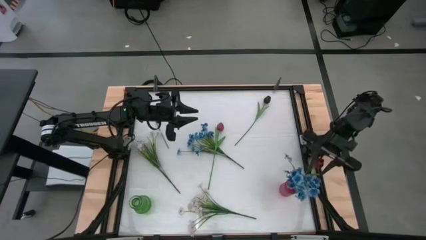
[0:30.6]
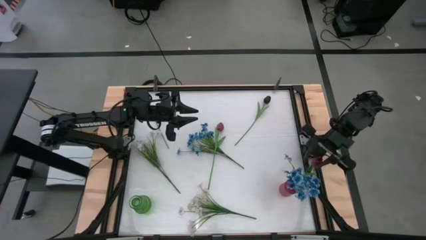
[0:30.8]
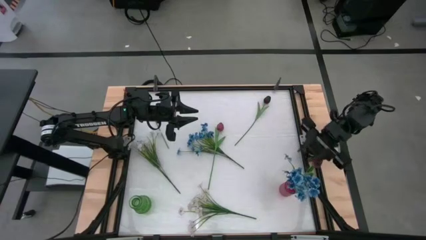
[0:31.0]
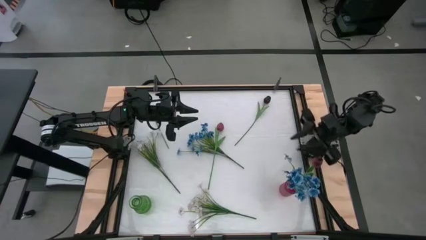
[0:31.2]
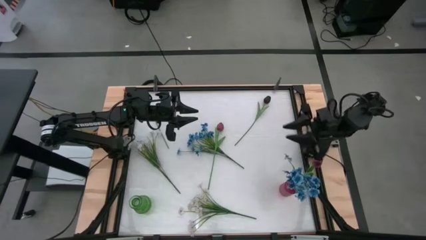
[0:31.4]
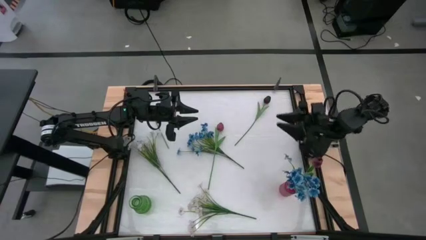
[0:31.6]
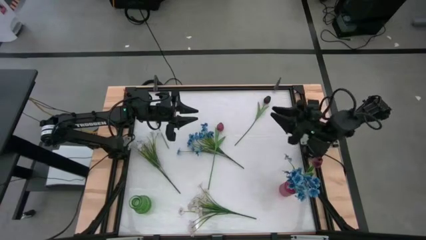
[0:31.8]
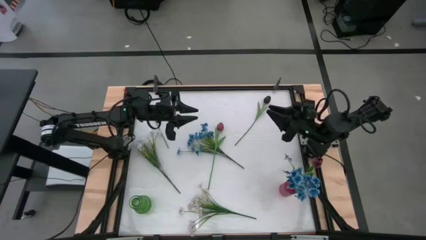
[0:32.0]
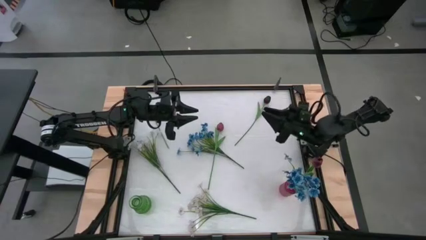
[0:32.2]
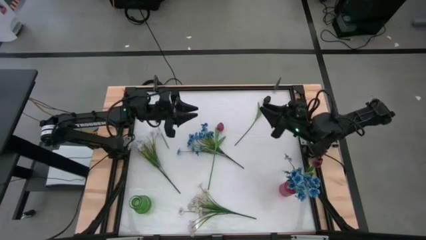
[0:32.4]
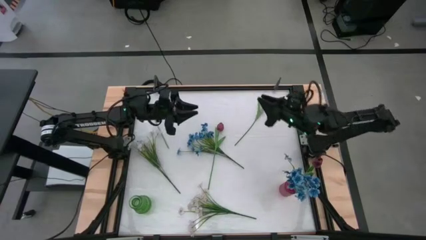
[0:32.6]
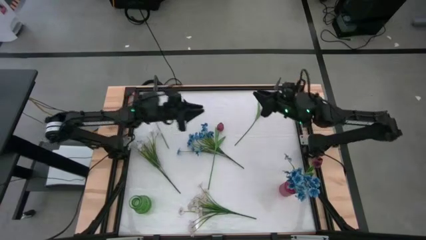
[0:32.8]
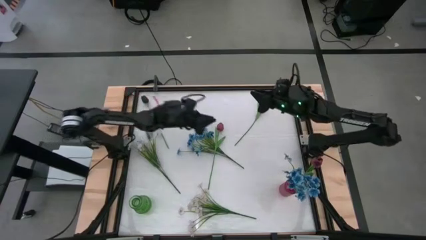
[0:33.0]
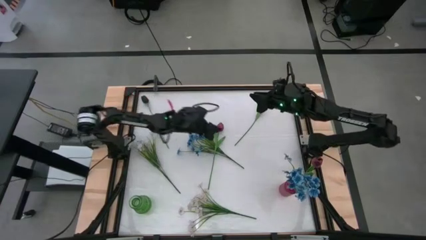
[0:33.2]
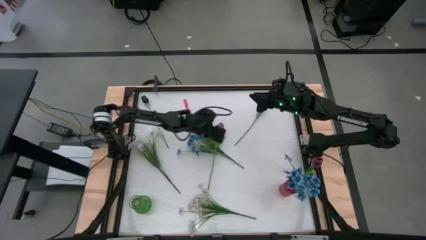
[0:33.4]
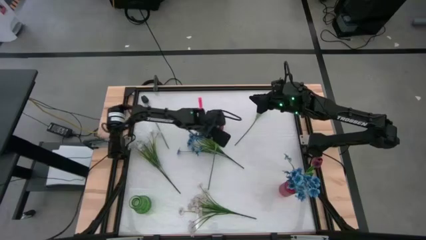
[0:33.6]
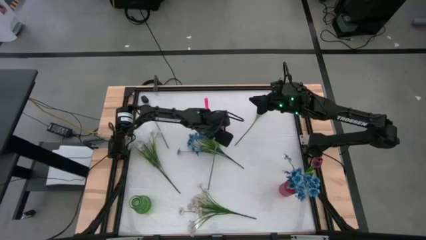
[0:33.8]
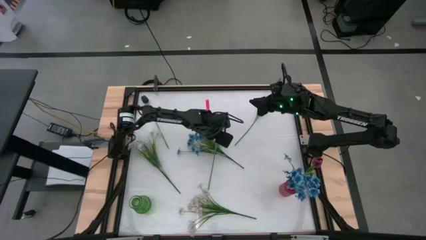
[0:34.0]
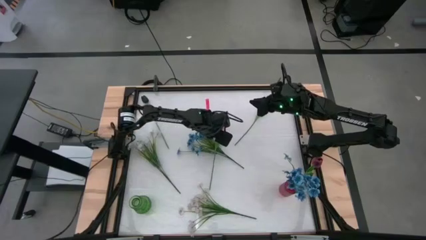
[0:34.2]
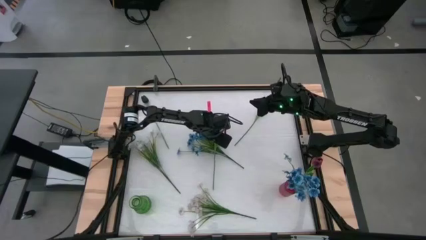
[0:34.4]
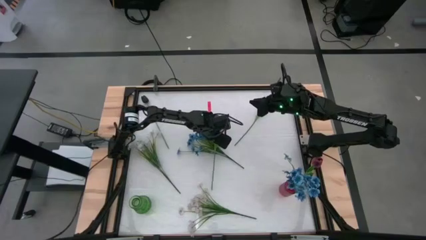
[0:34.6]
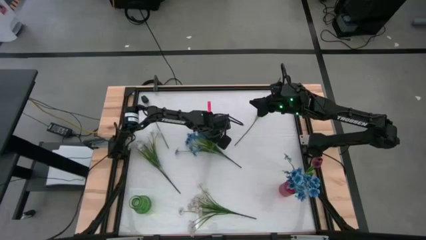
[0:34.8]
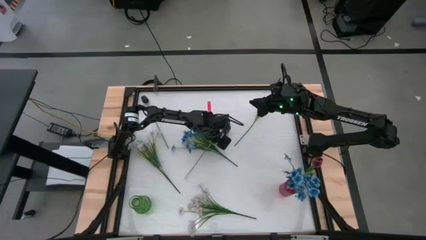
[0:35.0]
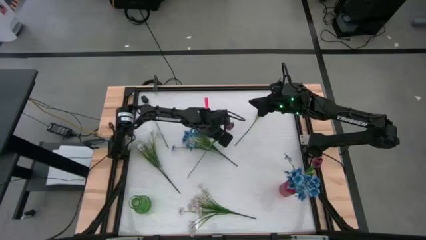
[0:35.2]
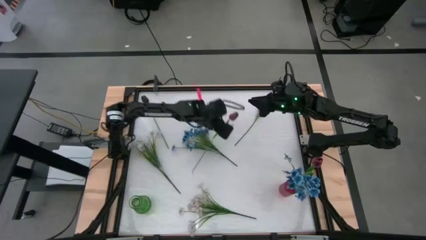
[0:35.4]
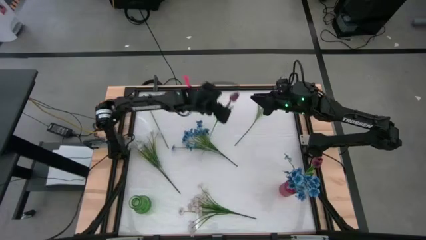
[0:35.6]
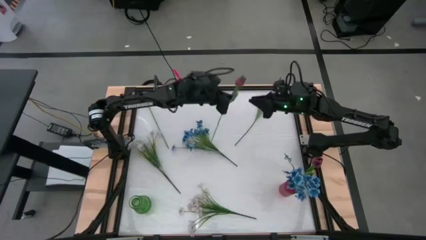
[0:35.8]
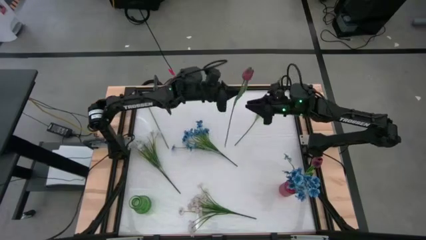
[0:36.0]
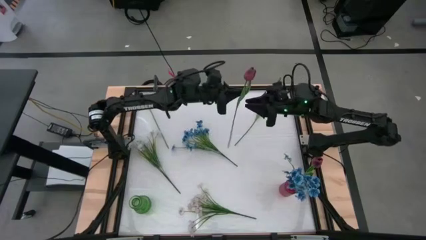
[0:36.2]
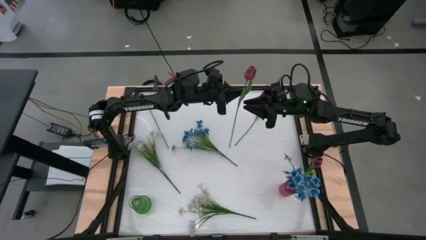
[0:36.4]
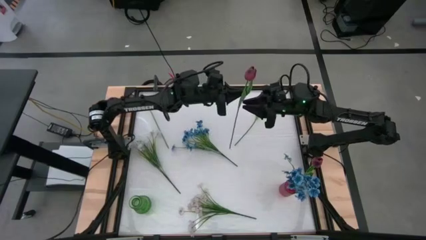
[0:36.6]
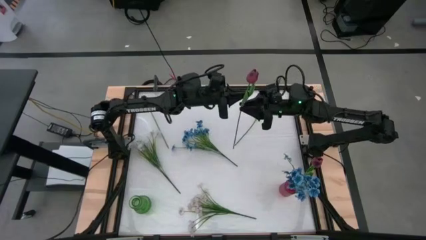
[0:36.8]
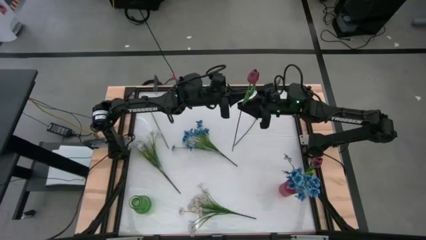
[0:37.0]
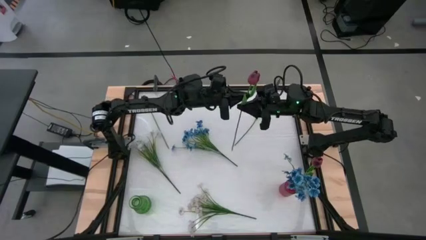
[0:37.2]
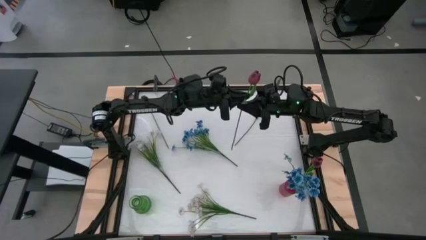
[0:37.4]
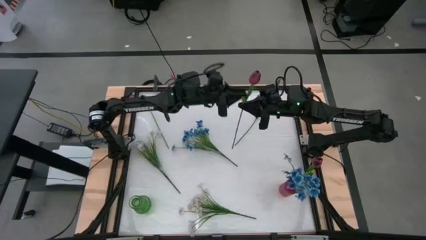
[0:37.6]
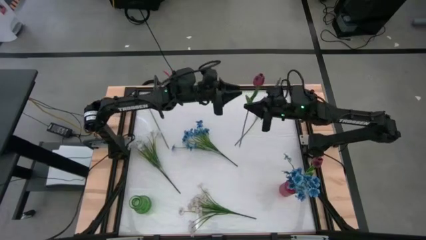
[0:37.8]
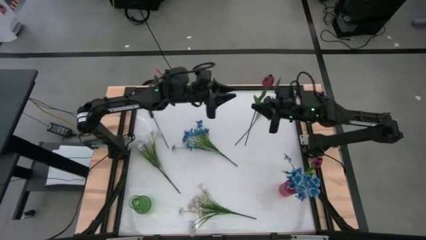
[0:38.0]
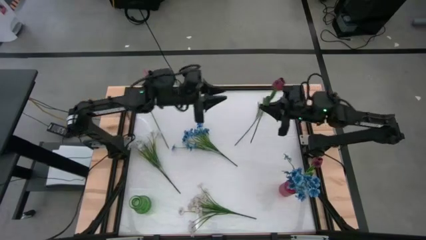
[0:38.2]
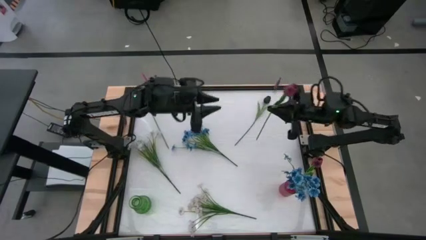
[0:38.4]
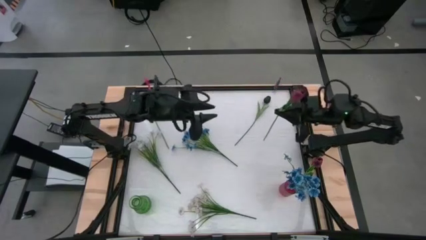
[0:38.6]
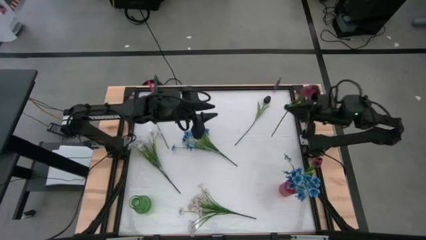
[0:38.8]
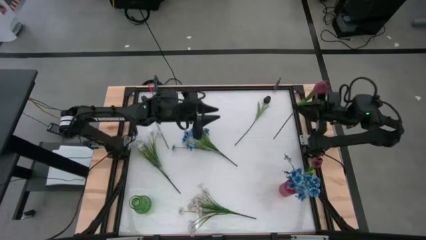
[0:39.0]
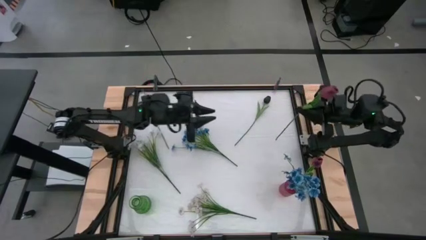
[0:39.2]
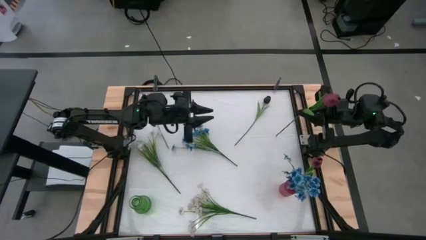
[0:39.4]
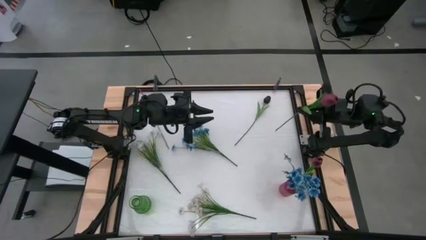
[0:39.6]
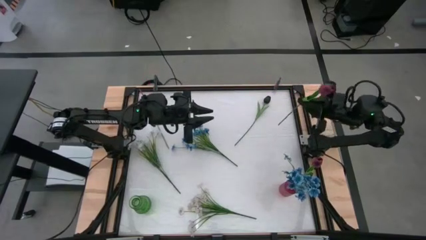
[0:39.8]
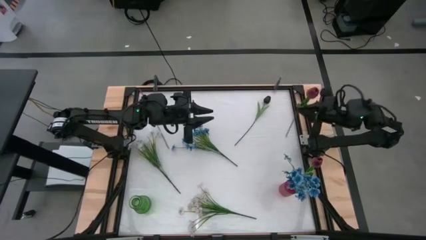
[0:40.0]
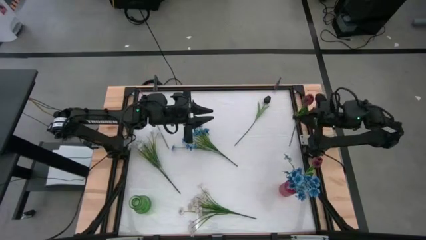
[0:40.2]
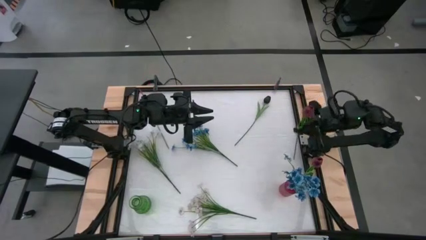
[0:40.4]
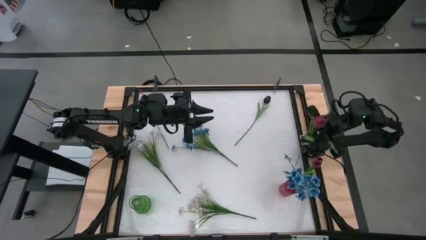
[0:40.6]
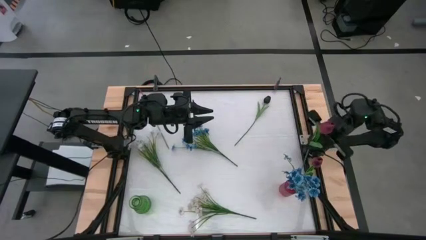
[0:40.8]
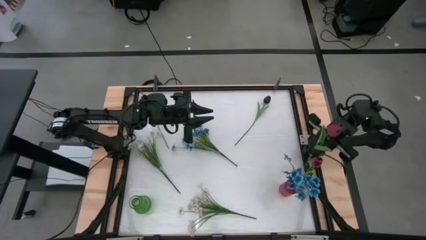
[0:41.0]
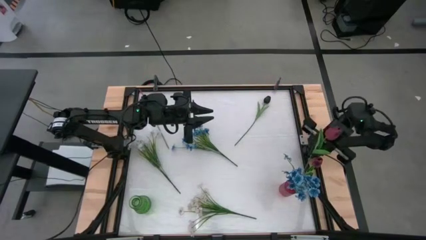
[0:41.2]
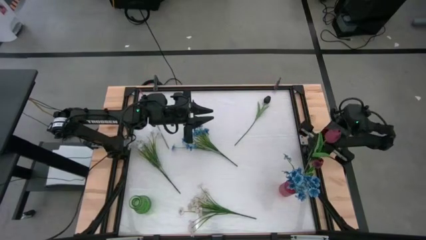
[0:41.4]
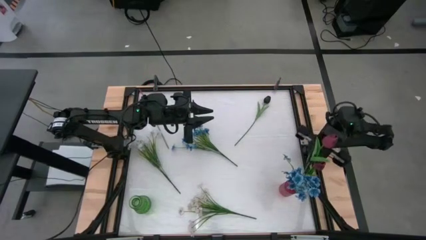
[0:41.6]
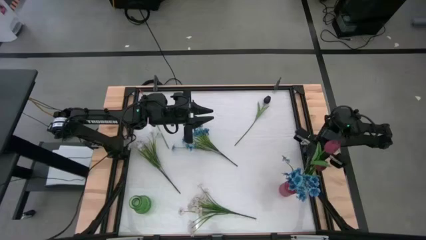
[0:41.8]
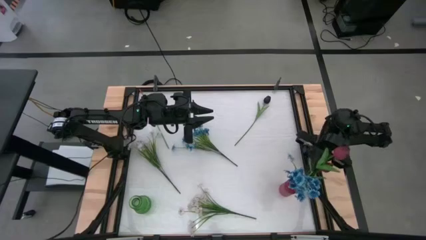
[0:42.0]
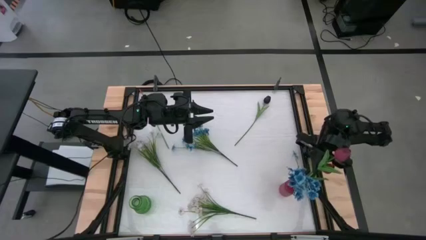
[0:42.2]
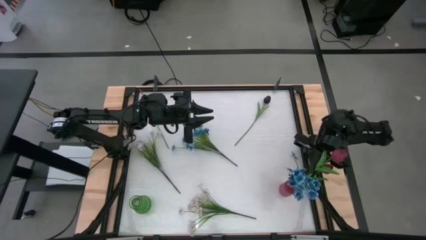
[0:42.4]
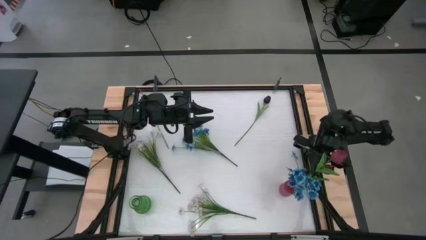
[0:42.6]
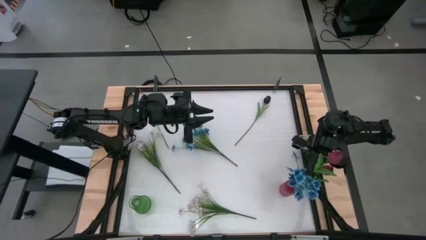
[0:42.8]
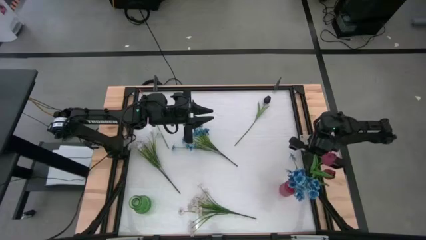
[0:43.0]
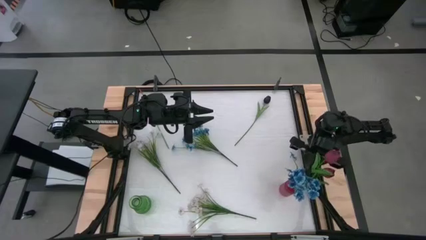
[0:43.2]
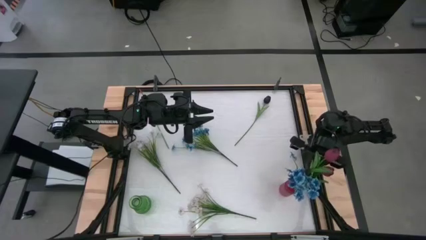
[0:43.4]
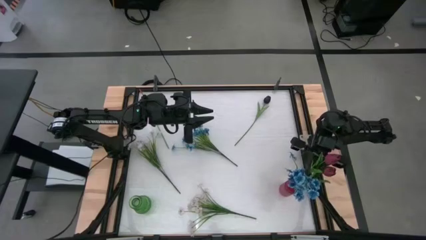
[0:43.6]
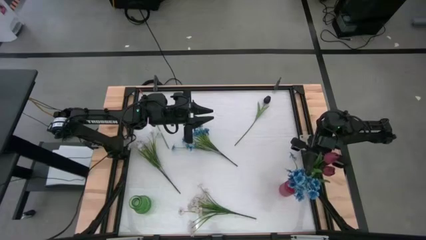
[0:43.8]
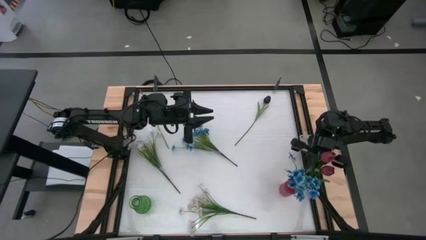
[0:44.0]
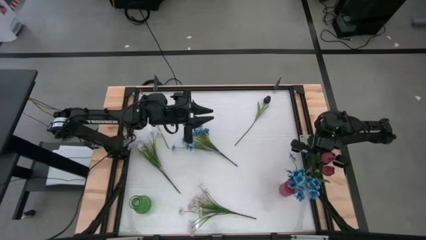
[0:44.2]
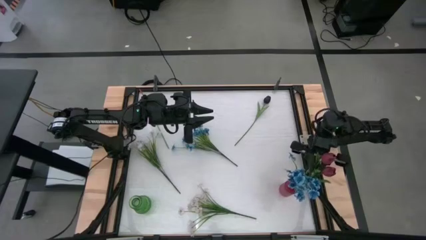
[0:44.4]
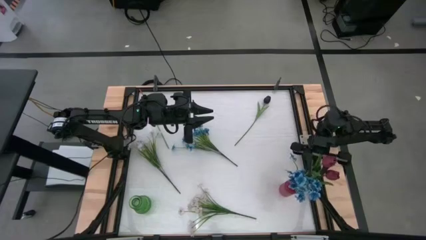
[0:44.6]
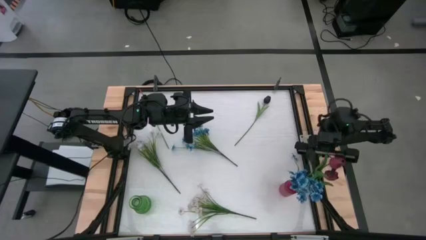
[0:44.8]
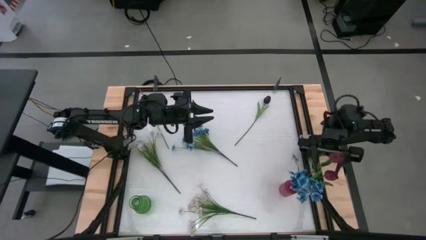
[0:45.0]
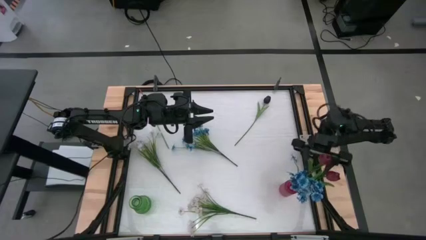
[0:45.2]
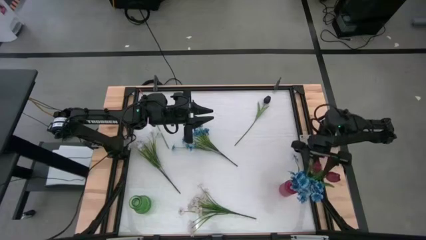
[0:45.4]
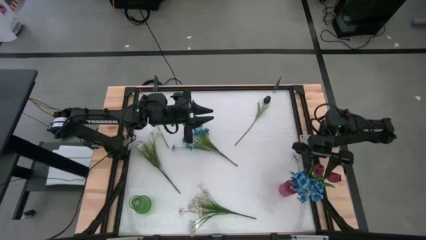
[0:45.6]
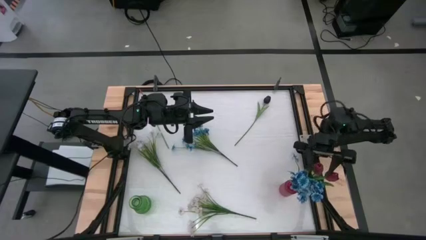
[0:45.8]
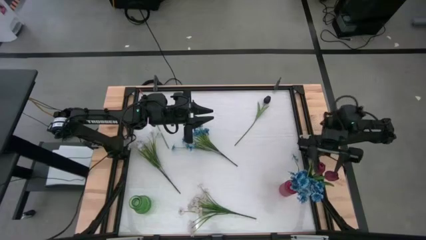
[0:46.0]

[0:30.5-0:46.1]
Task: Sort flowers into vase by color
Put the red tulip flower into the red flower vase

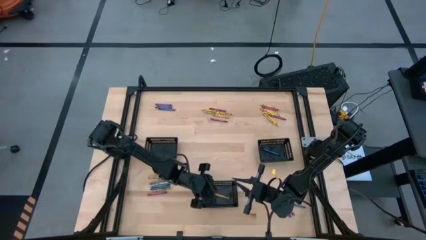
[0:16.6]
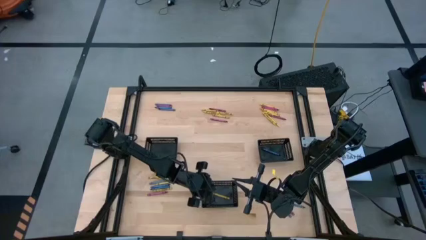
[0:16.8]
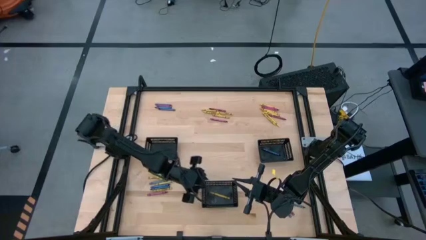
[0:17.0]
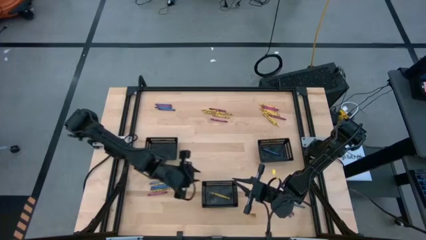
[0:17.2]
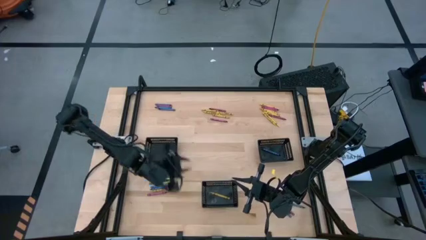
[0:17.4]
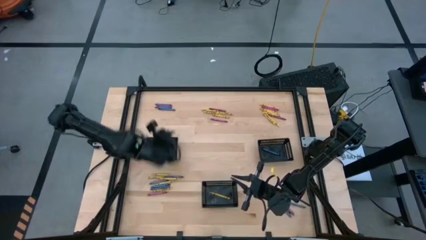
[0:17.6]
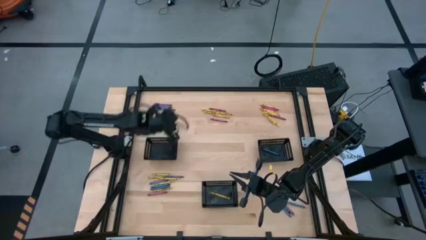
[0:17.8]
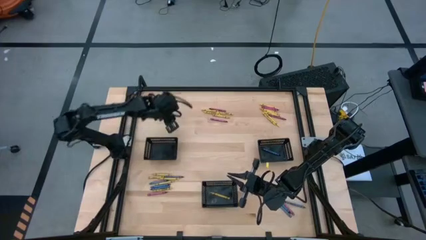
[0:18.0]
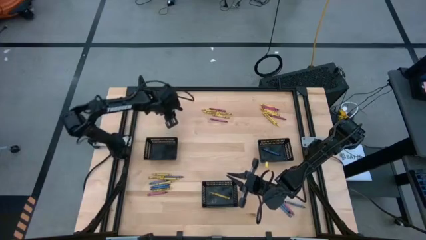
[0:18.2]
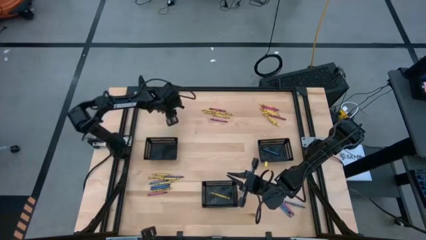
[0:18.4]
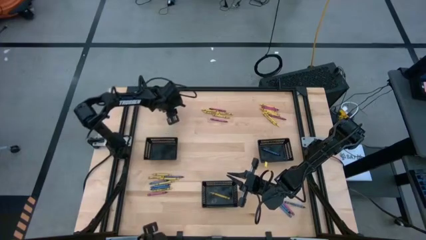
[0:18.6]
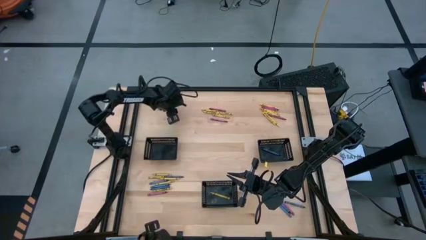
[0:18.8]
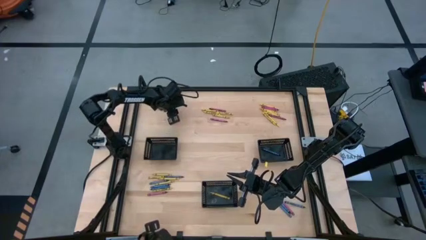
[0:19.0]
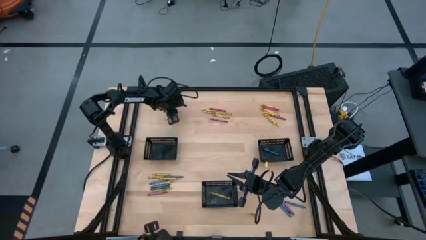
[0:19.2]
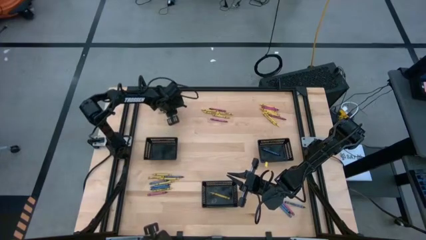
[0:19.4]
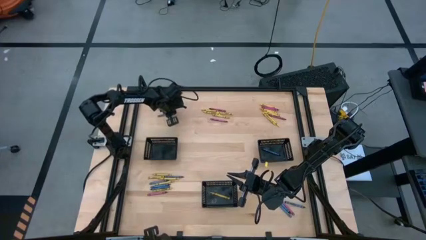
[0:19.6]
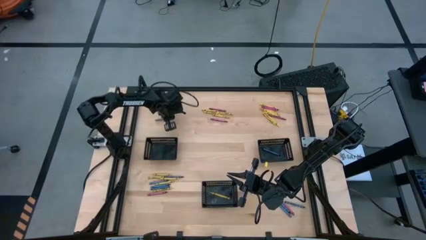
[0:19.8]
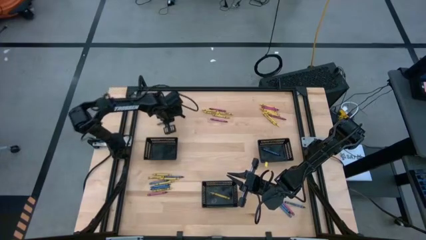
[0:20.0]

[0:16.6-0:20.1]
Task: Sort crayons
Put the blue crayon into the left black bin
